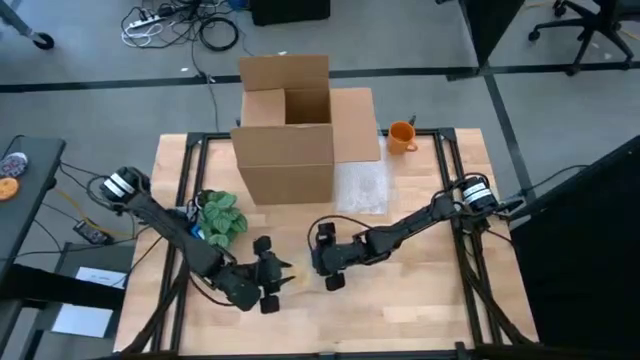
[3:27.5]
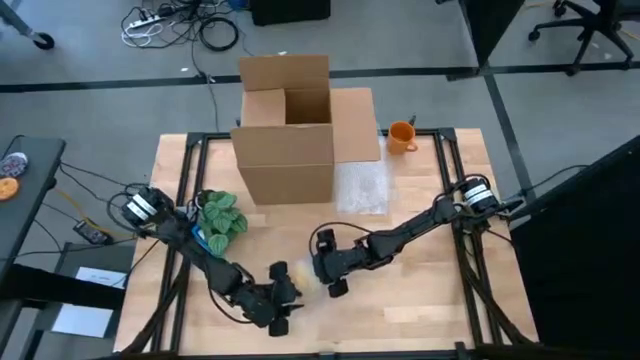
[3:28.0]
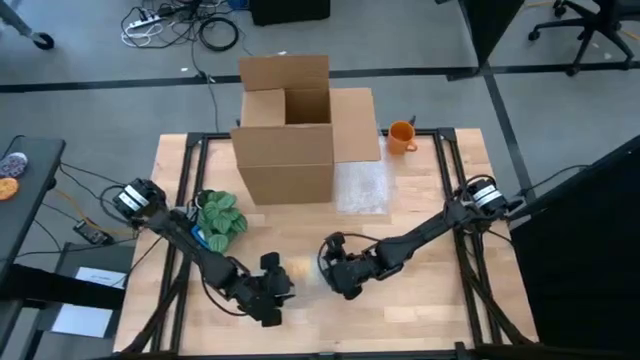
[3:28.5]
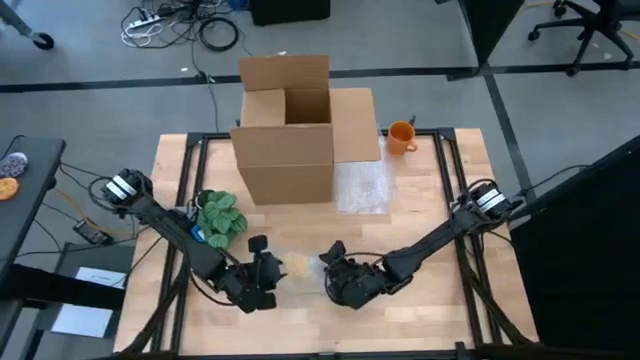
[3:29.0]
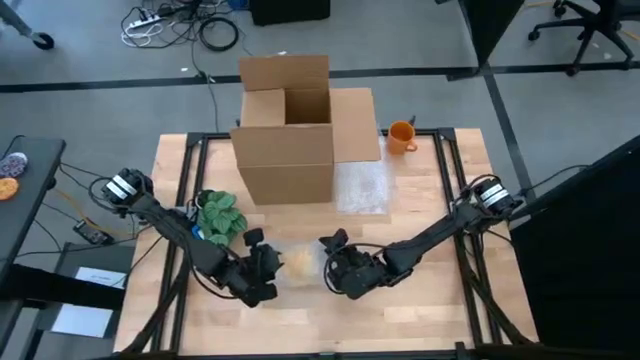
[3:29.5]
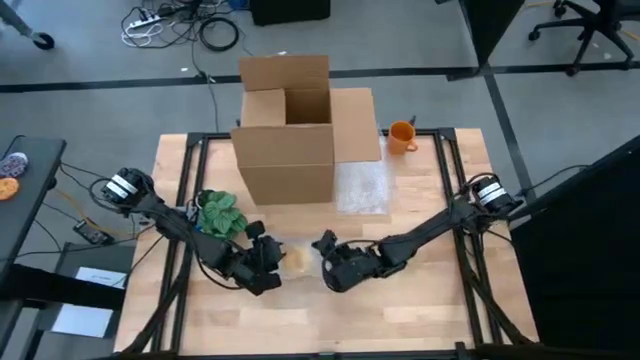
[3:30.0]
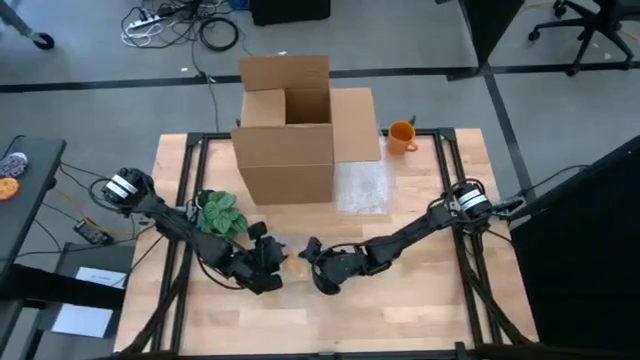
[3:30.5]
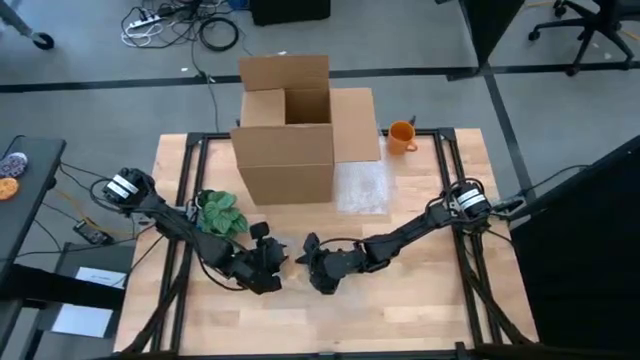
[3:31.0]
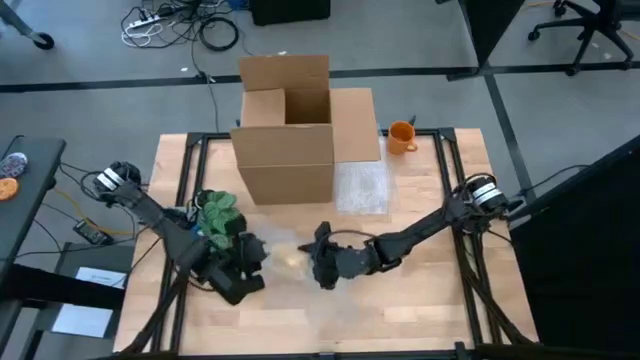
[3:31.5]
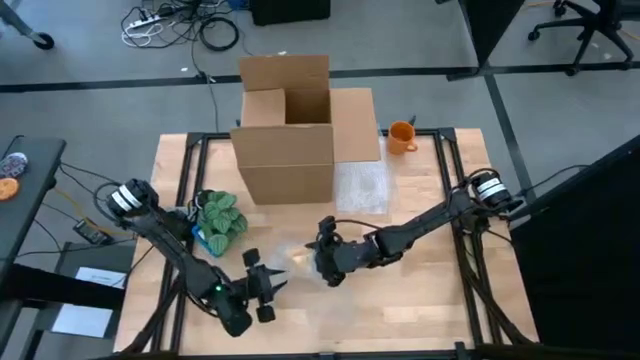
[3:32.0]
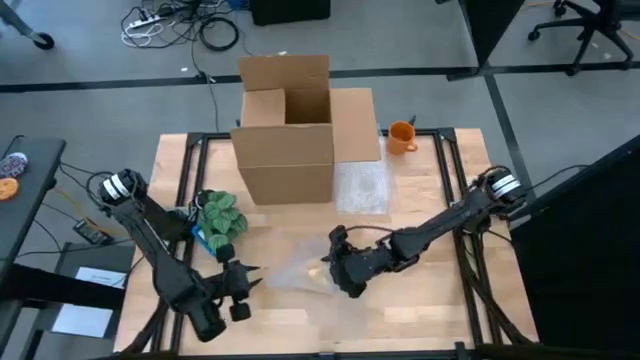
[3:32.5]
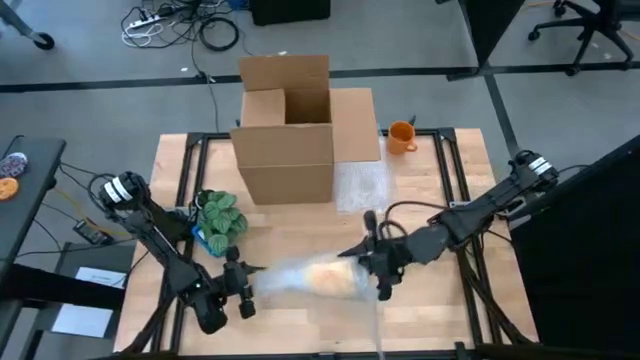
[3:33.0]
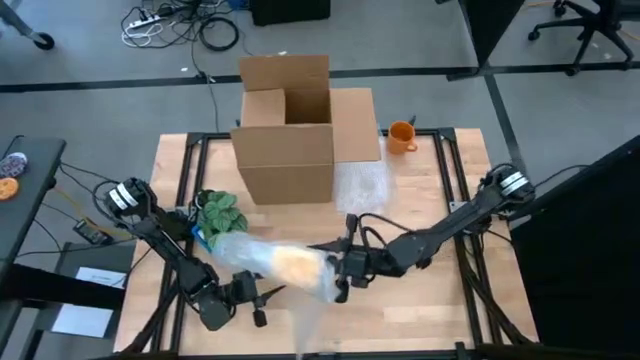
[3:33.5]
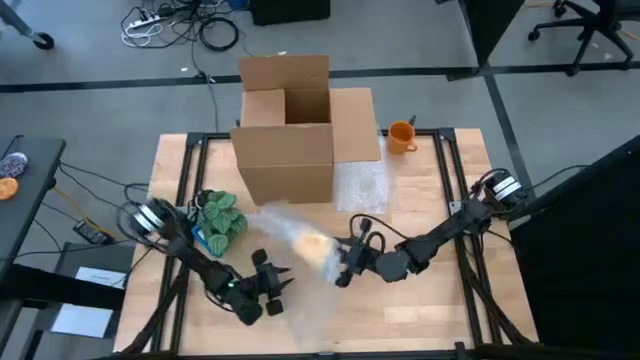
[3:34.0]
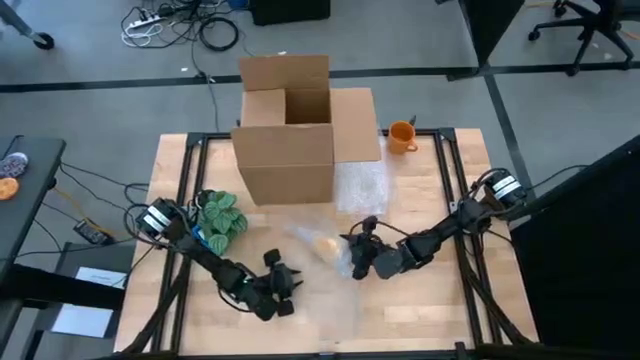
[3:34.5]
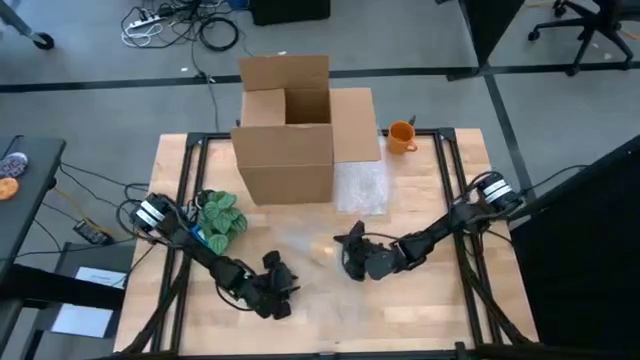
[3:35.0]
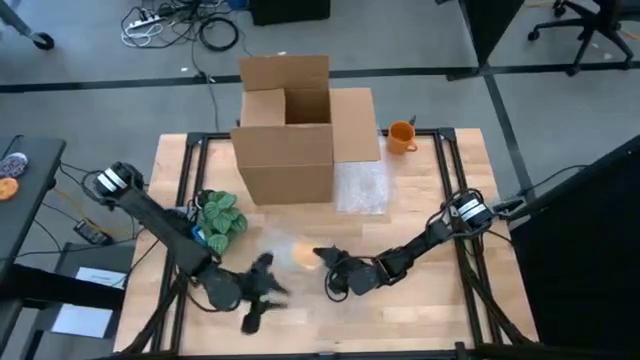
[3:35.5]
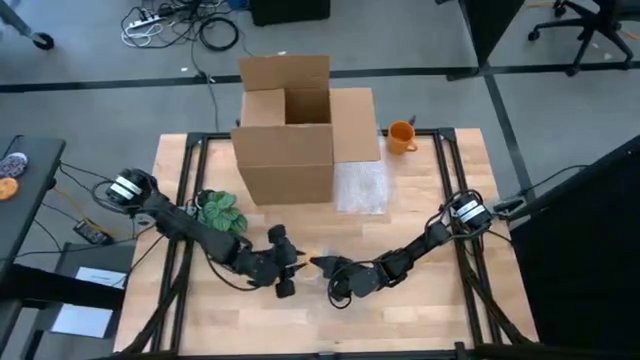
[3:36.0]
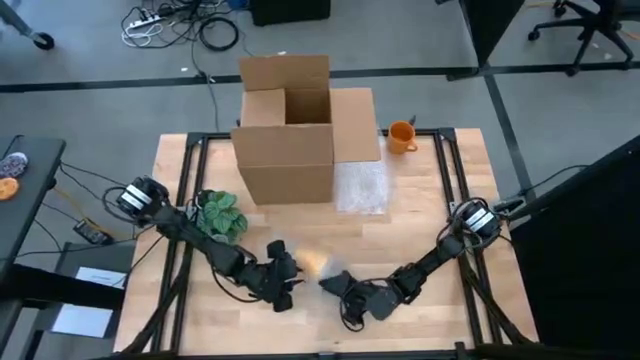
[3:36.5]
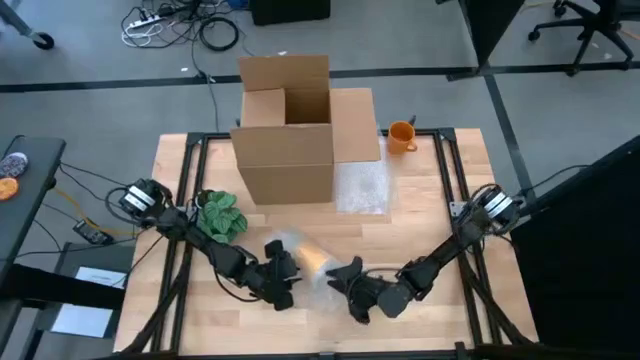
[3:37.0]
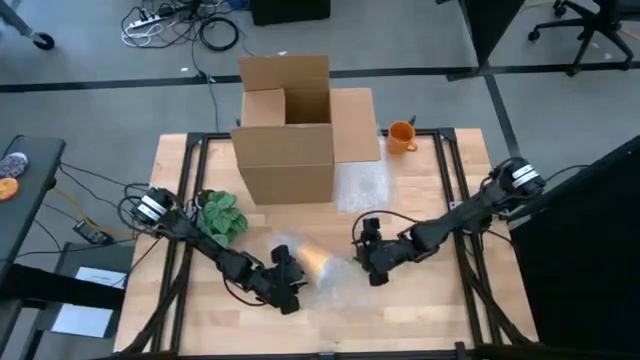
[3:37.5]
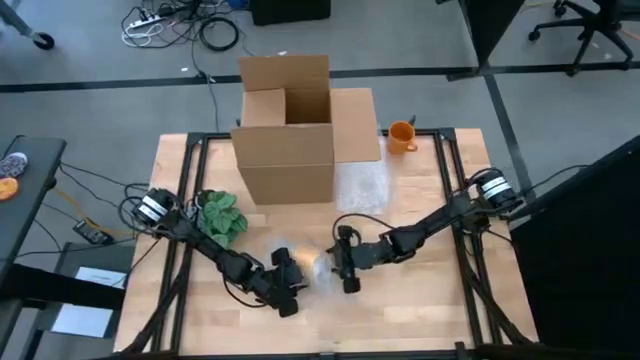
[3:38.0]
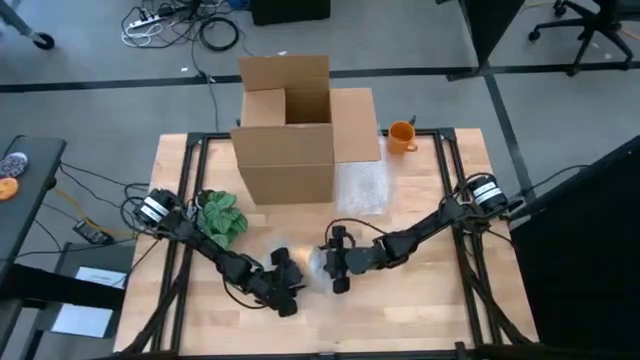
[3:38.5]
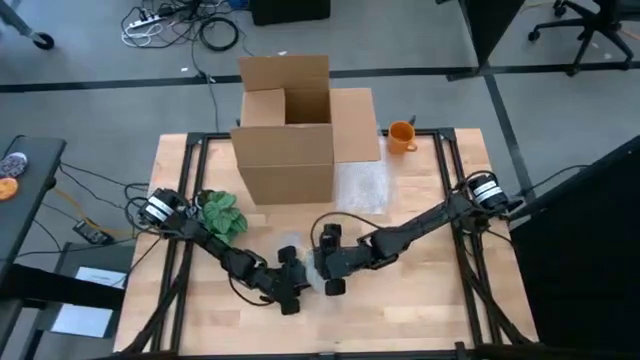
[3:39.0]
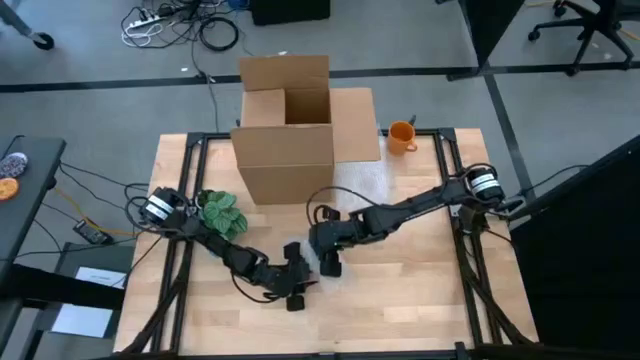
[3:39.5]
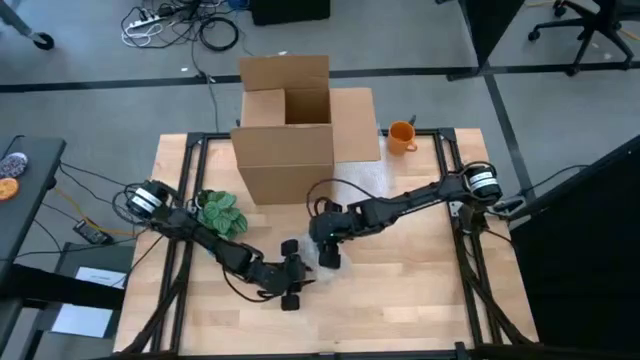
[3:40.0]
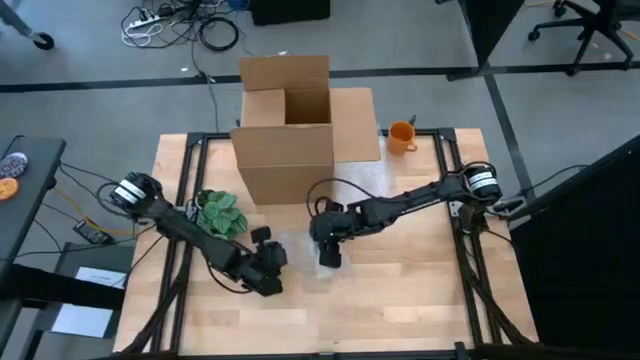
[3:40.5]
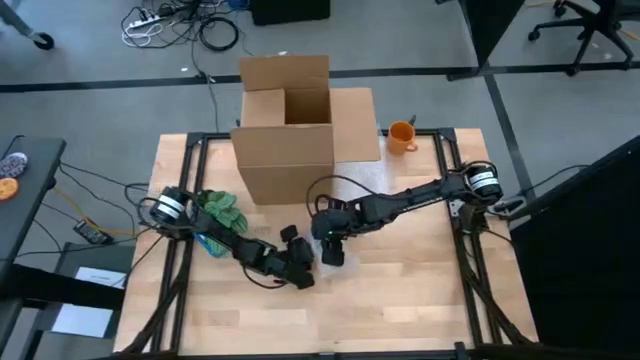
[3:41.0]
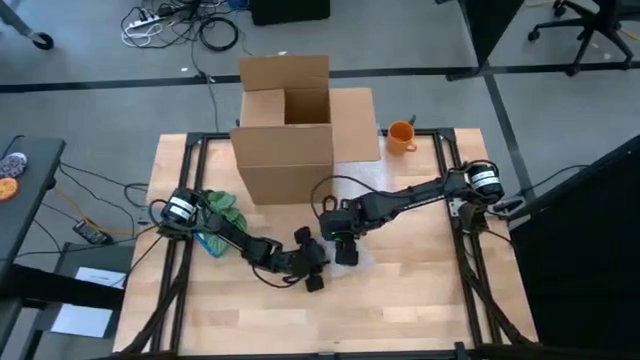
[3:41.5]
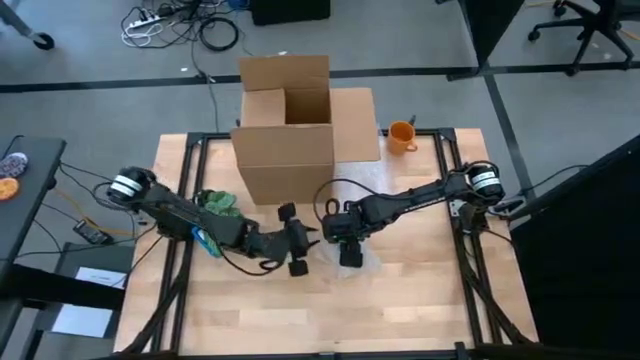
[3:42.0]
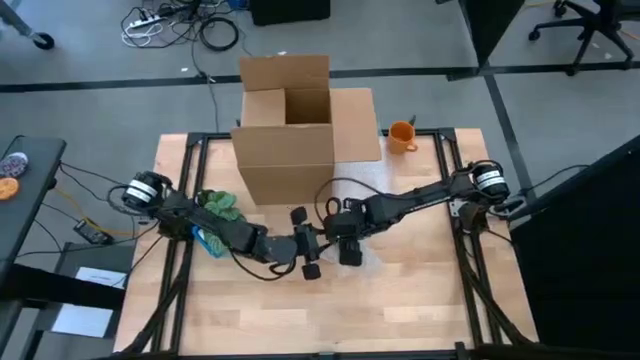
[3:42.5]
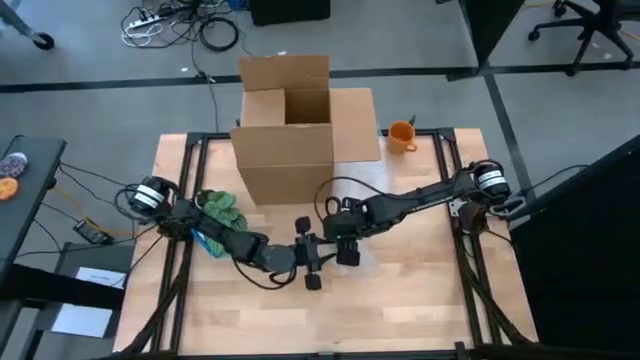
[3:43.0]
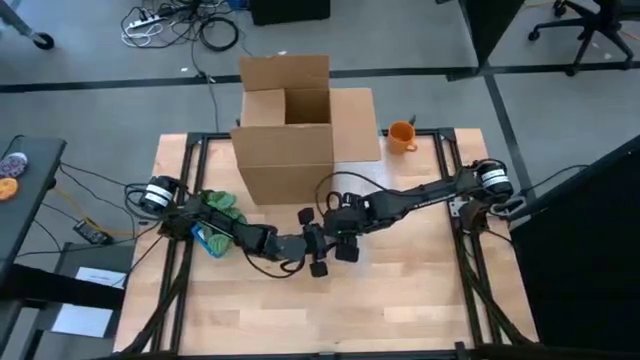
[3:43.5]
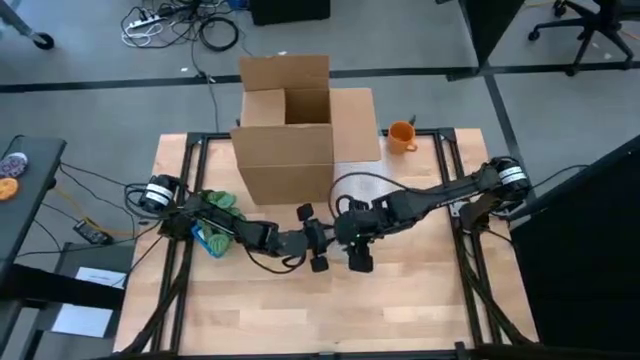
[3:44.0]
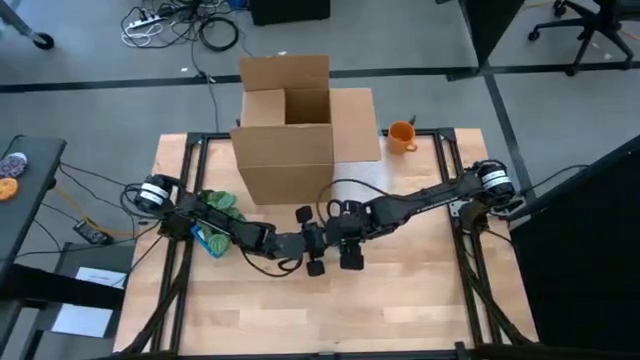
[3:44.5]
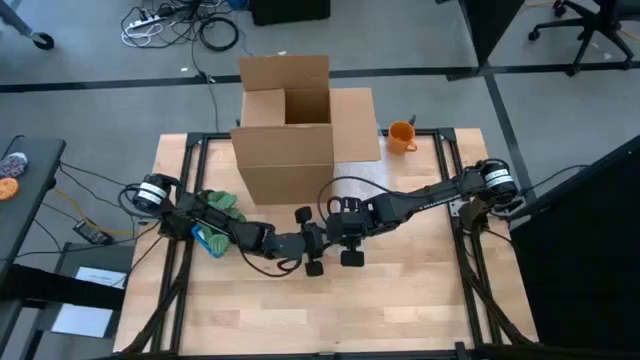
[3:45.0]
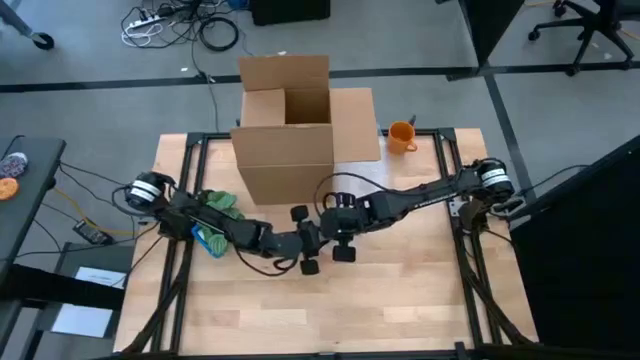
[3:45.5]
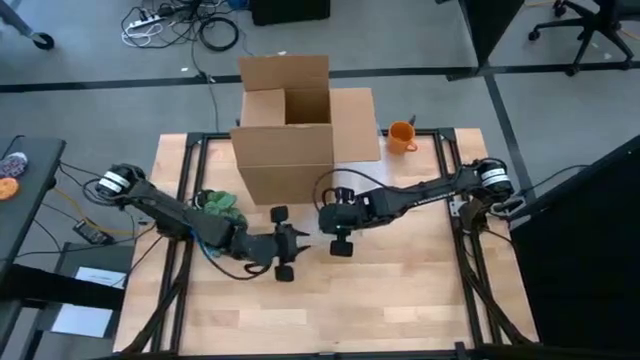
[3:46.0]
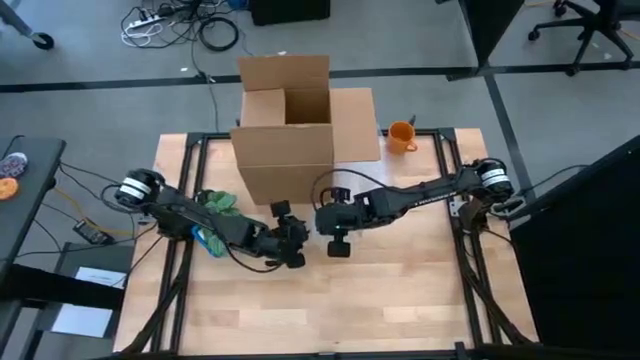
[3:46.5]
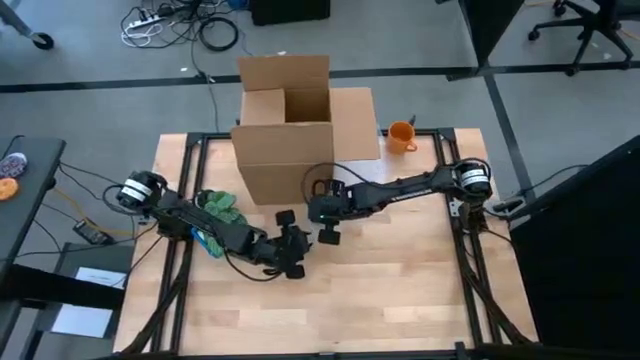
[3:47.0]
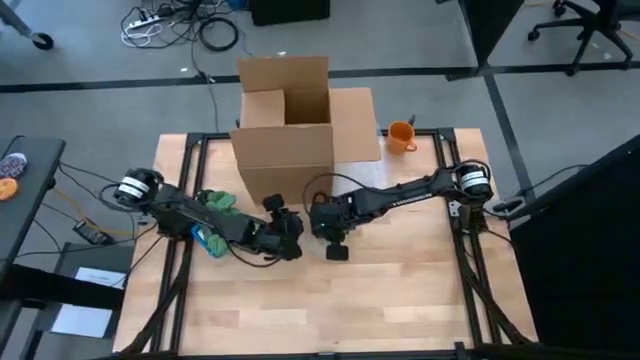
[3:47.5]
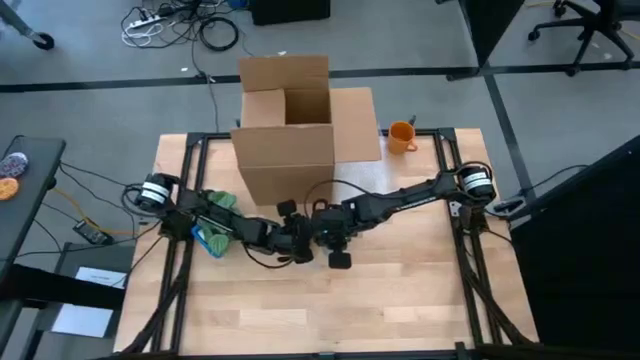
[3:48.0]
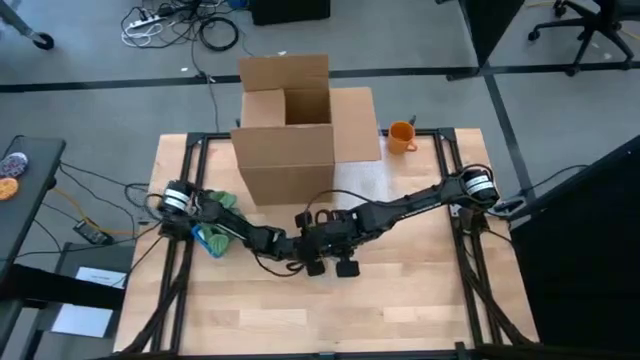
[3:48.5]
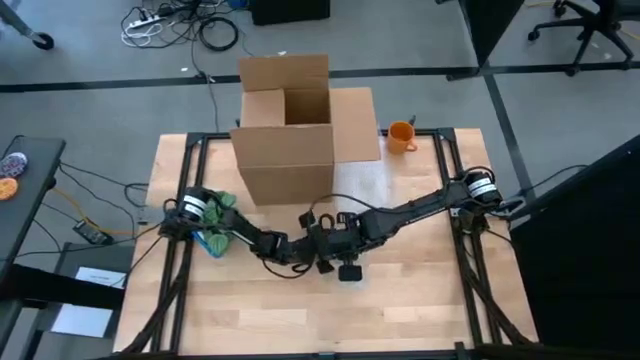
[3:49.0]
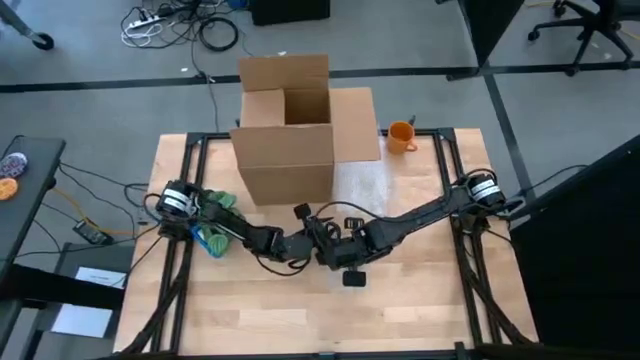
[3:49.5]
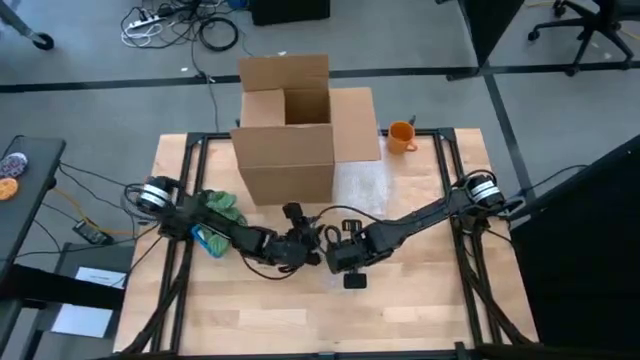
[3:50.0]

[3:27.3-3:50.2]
Task: wrap mug
Wrap the yellow mug with the bubble wrap
